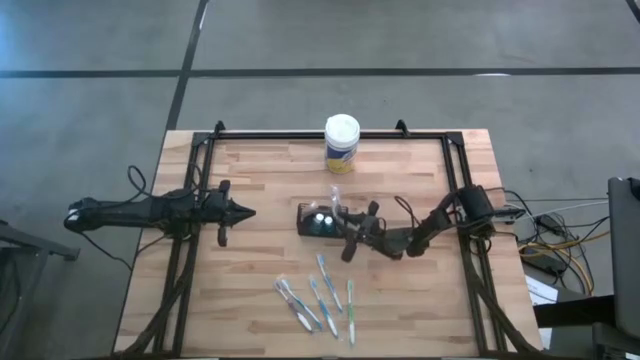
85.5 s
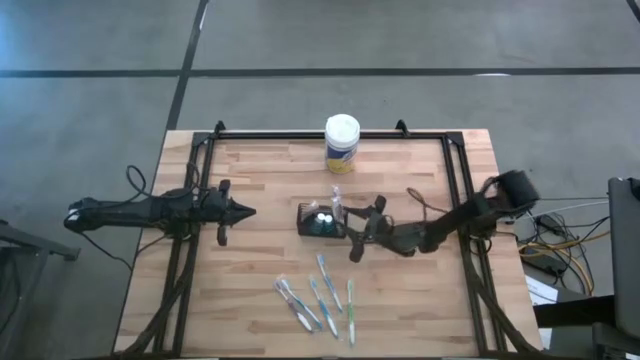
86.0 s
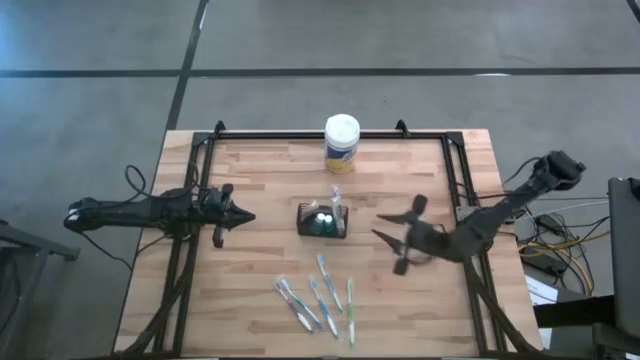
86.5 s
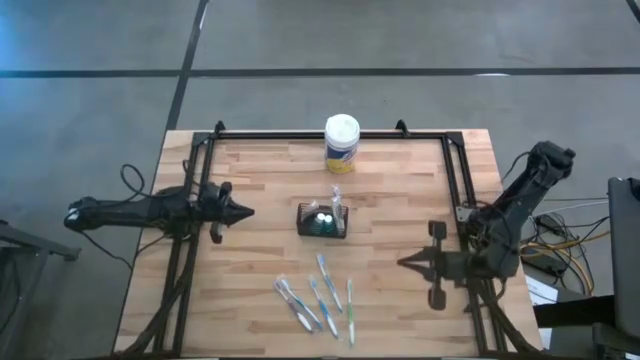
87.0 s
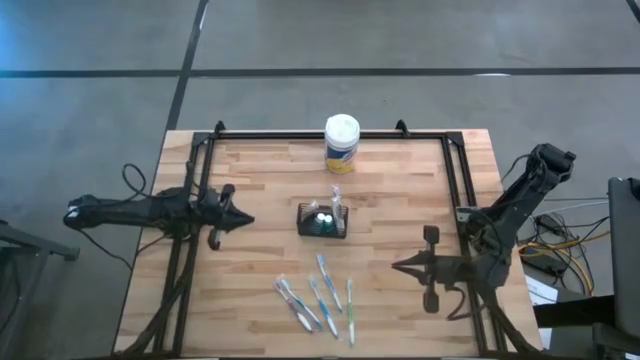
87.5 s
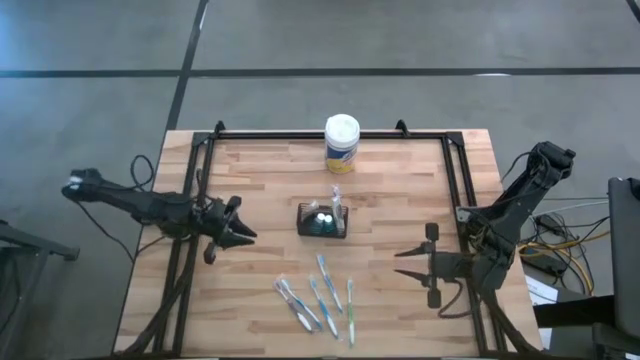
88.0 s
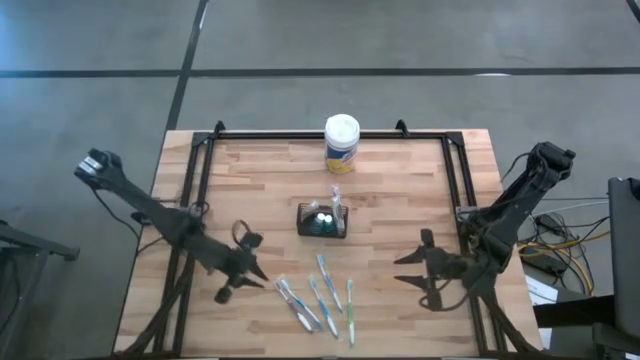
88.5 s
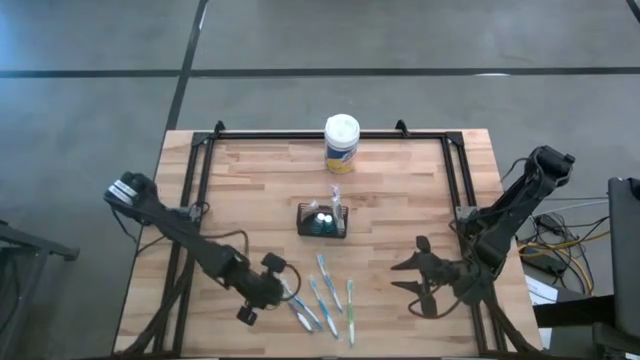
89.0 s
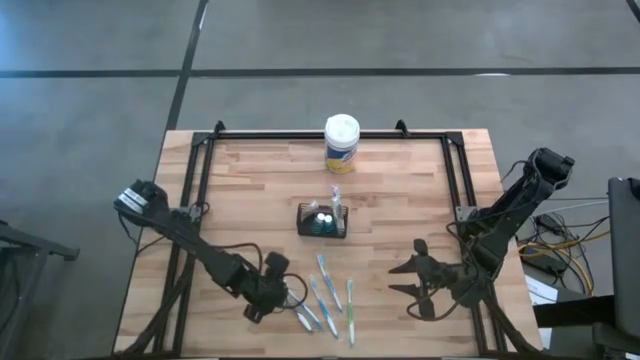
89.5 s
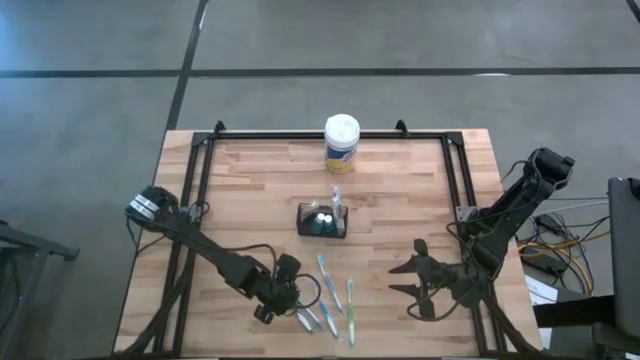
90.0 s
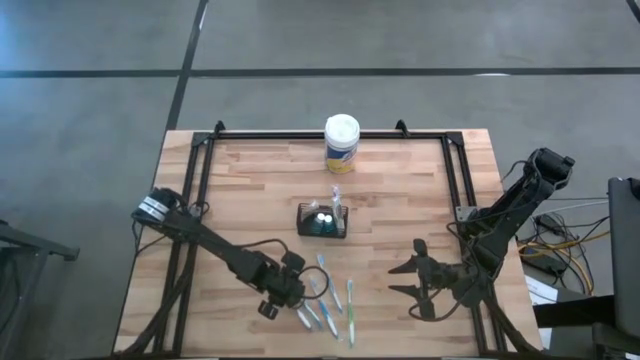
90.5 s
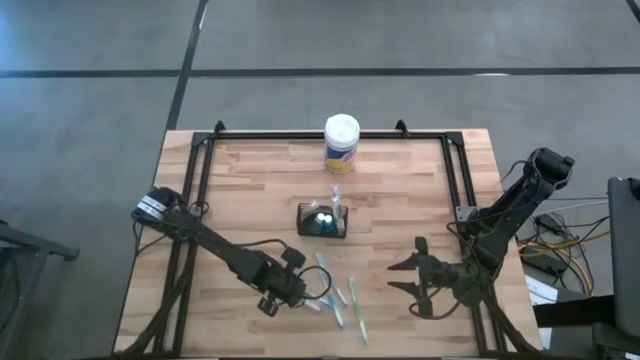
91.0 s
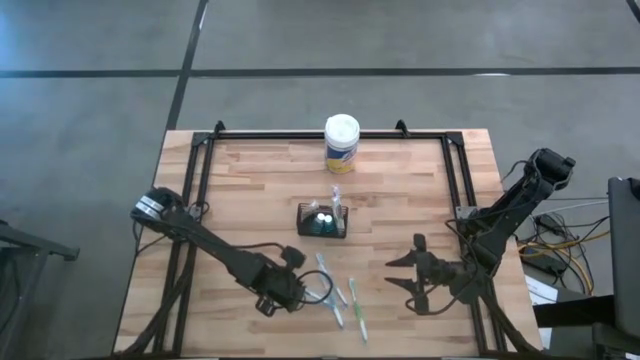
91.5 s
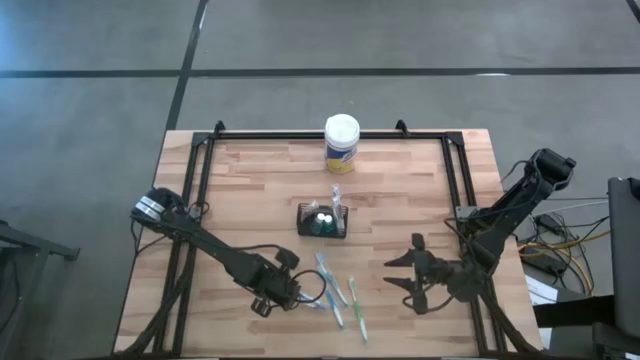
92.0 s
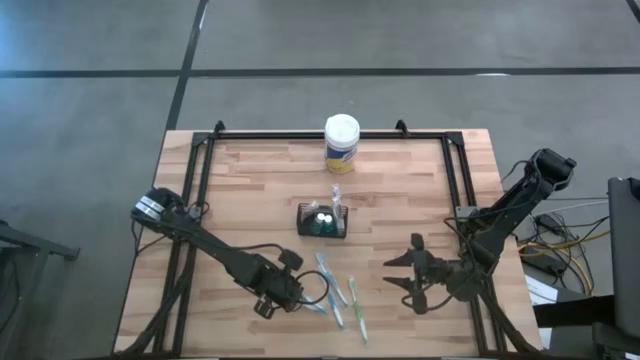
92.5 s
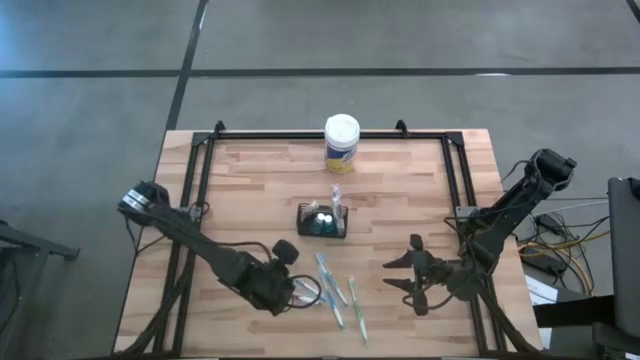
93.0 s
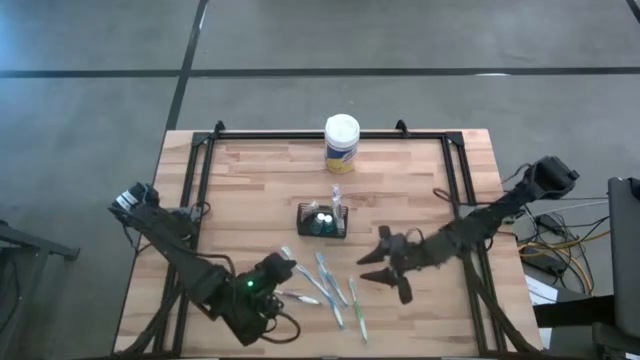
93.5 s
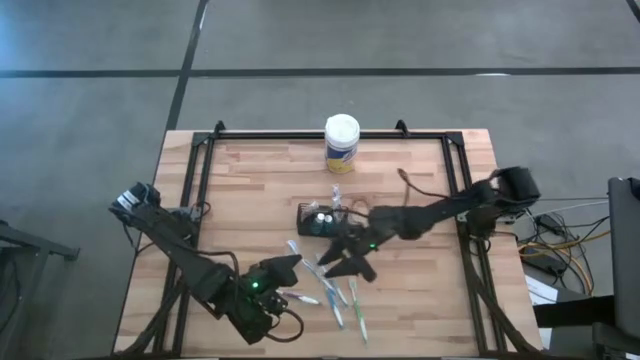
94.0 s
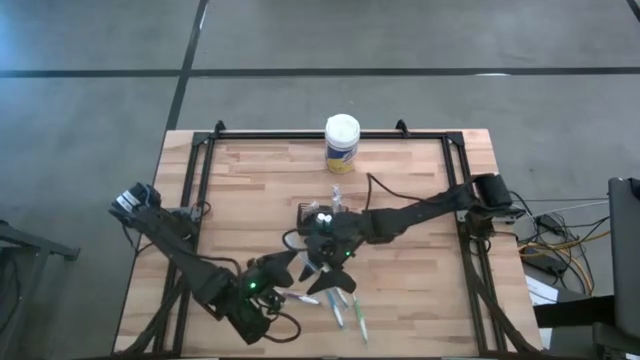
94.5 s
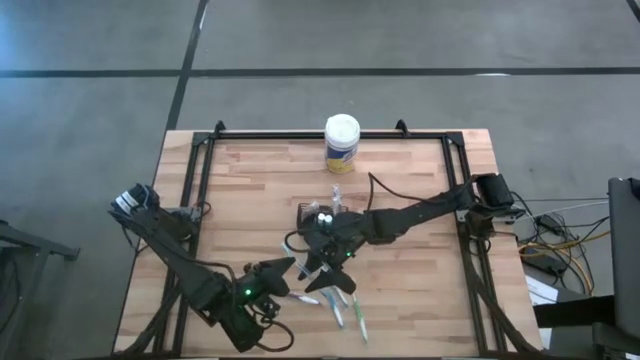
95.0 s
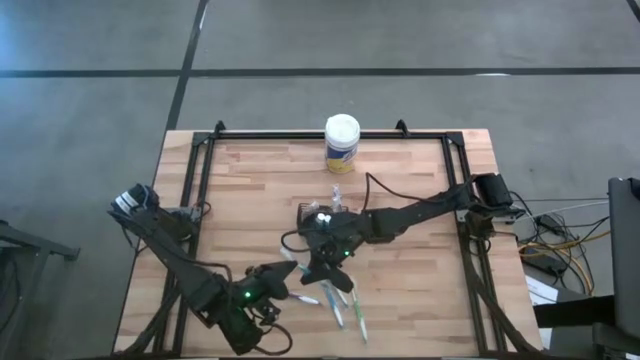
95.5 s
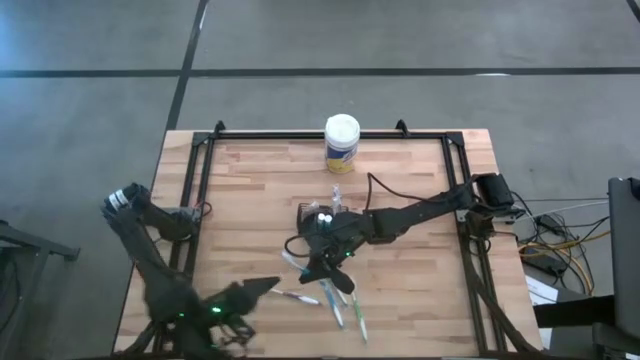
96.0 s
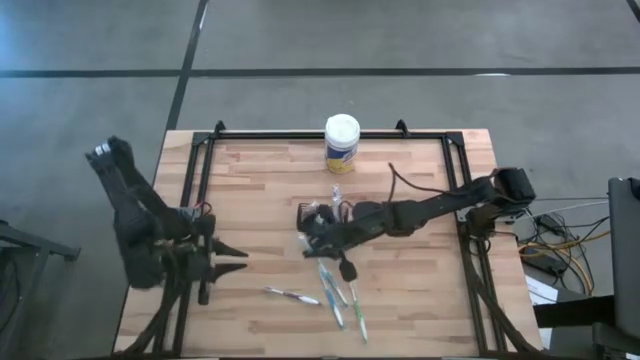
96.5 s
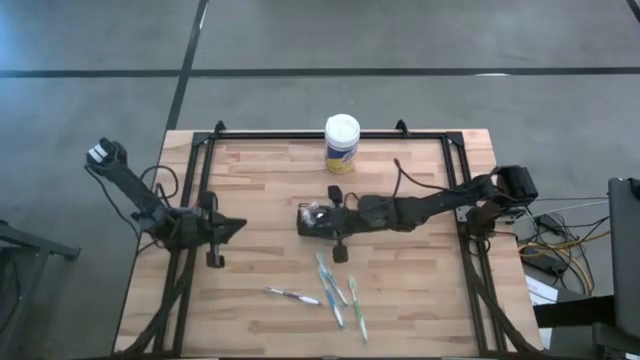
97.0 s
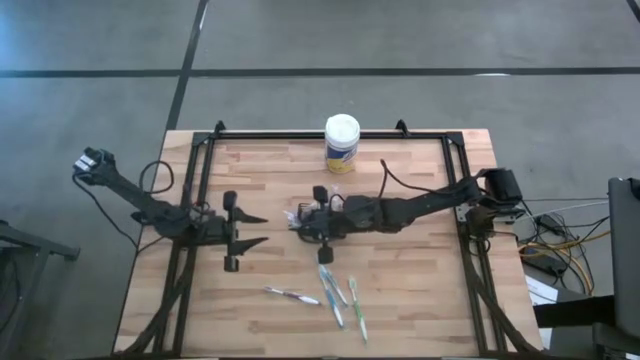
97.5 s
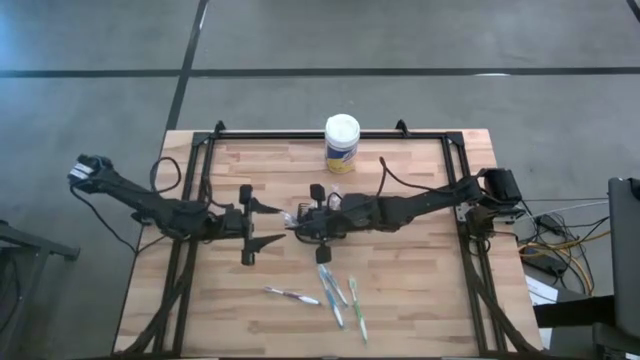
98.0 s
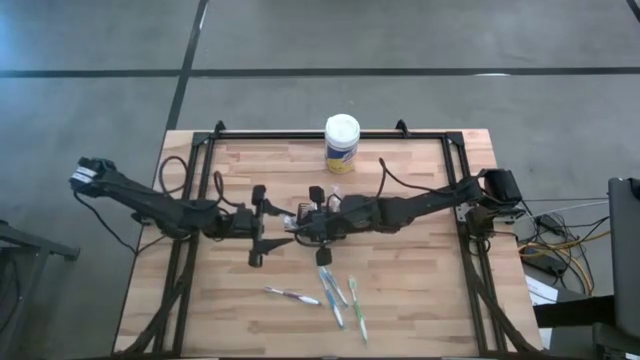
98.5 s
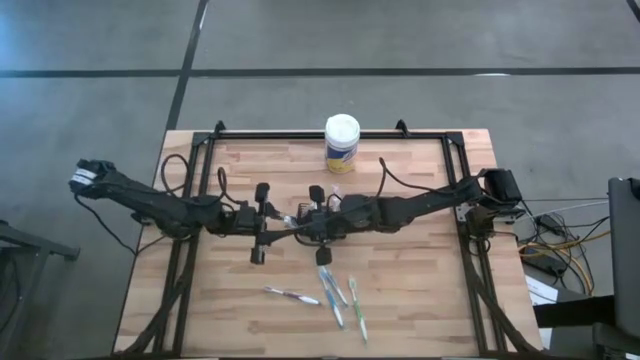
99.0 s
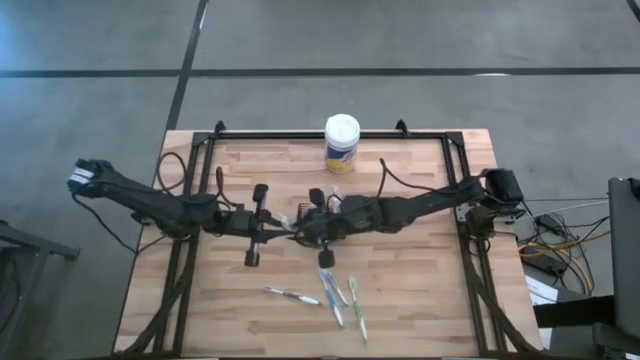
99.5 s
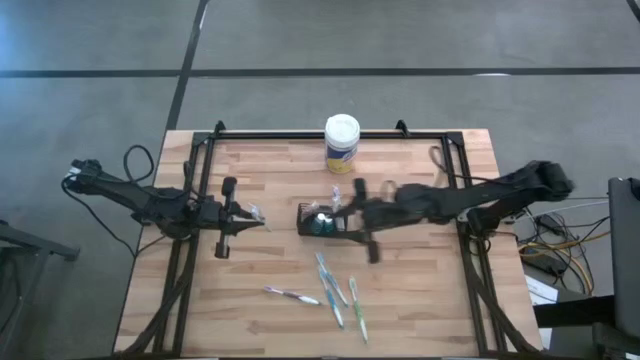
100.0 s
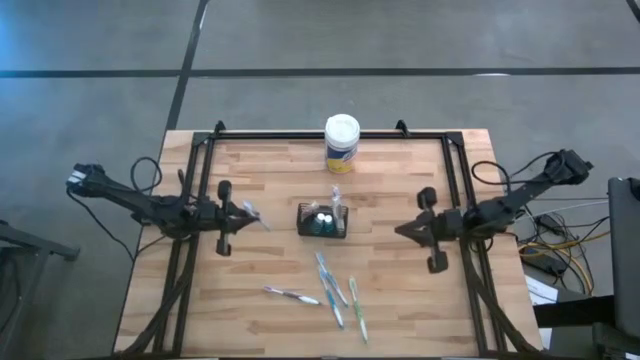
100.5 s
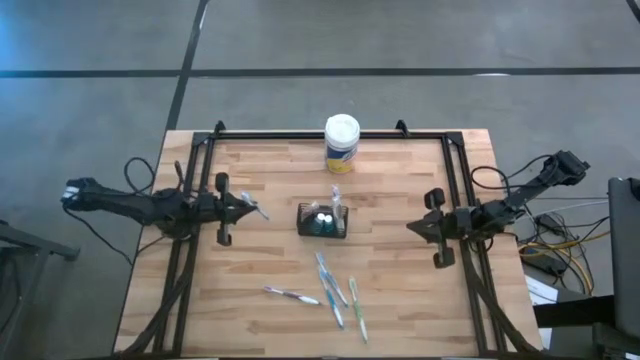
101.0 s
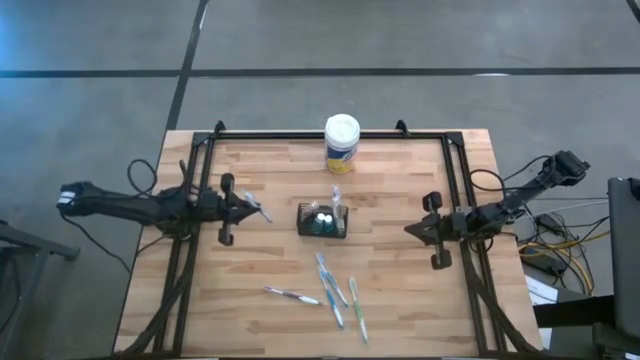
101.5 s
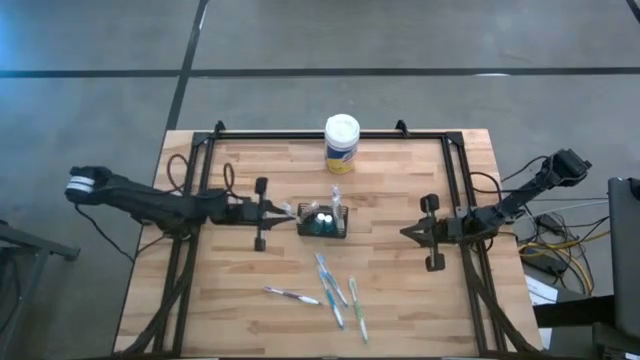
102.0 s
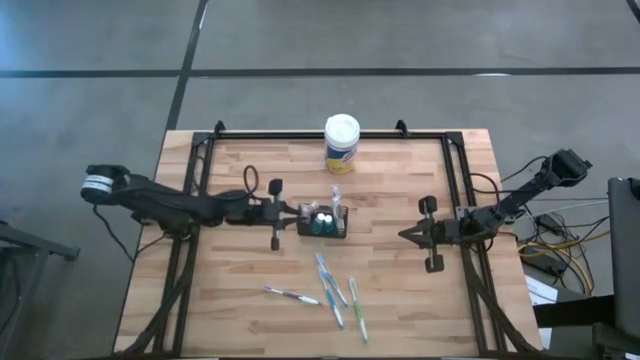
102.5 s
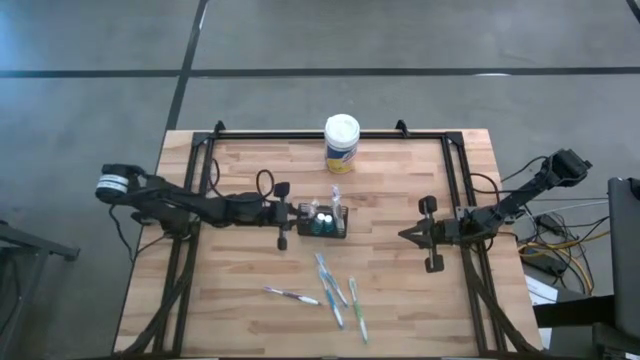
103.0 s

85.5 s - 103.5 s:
Task: Pick & Place toothbrushing station
Put the left blue toothbrush into the wire organizer

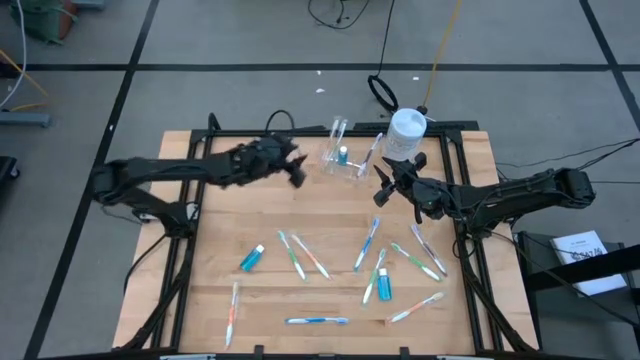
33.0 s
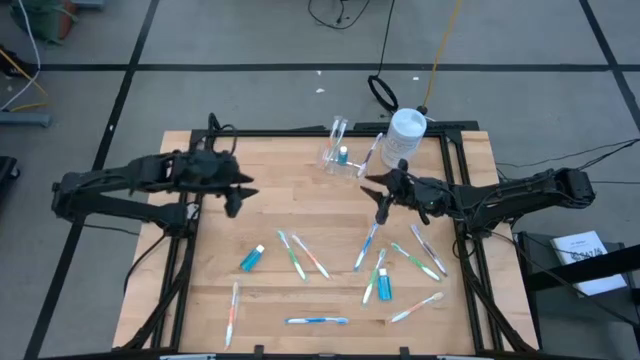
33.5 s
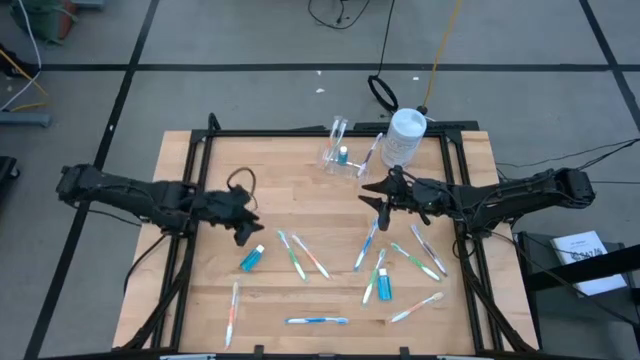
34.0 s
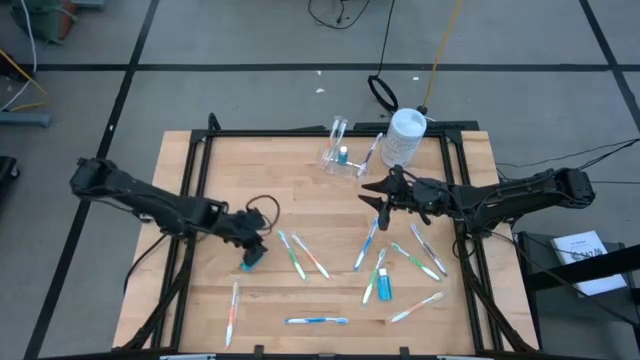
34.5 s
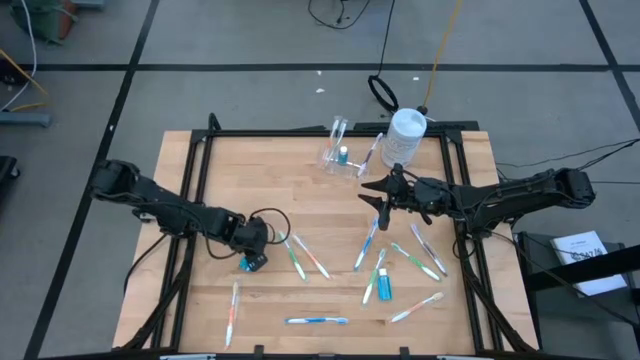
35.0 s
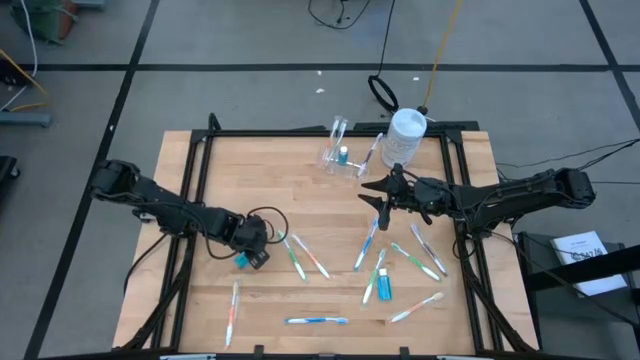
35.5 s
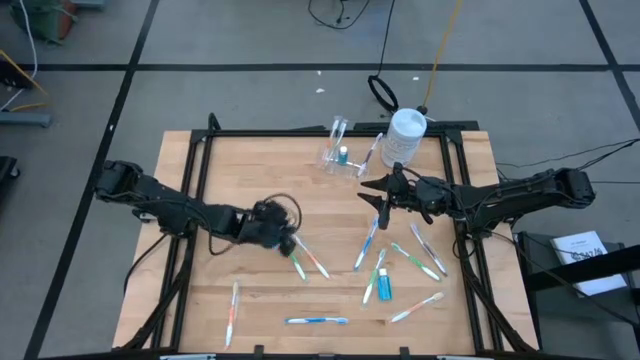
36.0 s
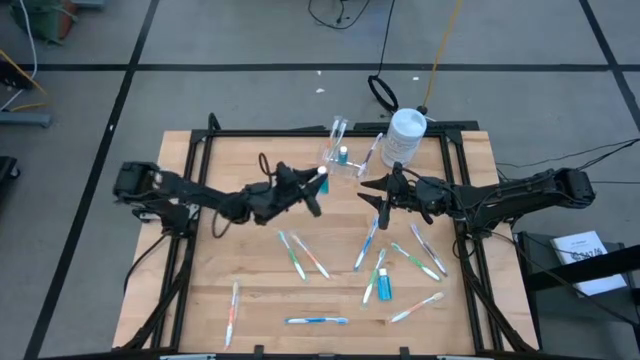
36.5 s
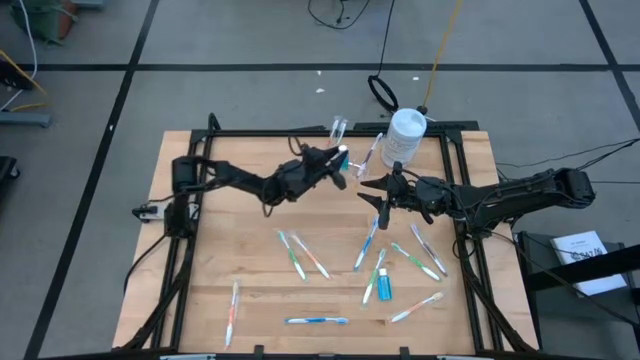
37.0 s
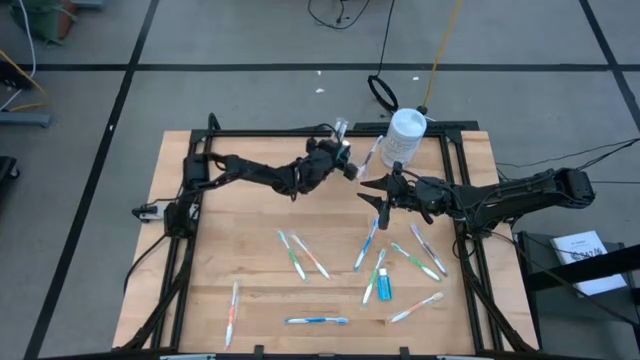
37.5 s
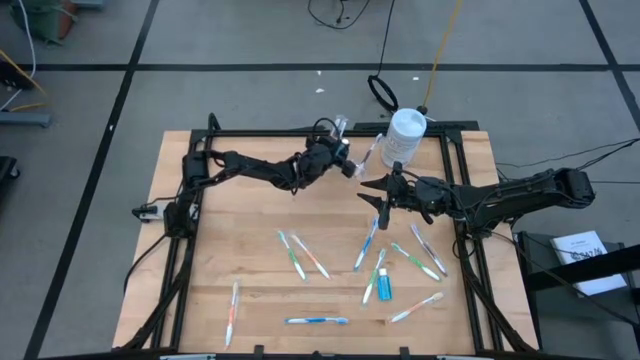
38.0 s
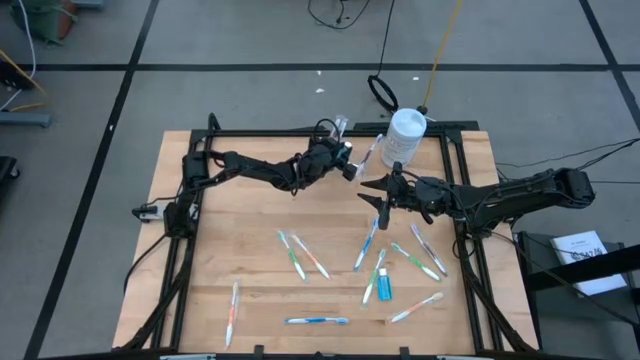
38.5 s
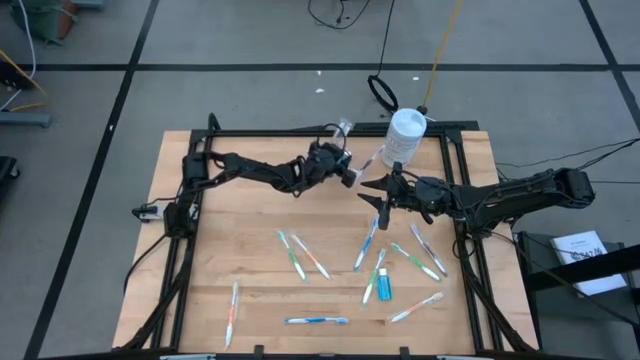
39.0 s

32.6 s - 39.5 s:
Task: Pick & Place toothbrushing station
Put the blue mouthwash into the transparent organizer
